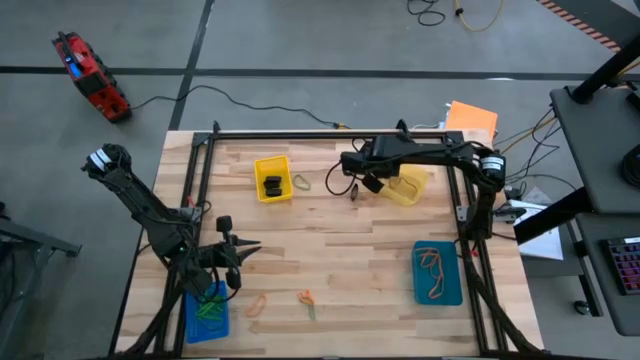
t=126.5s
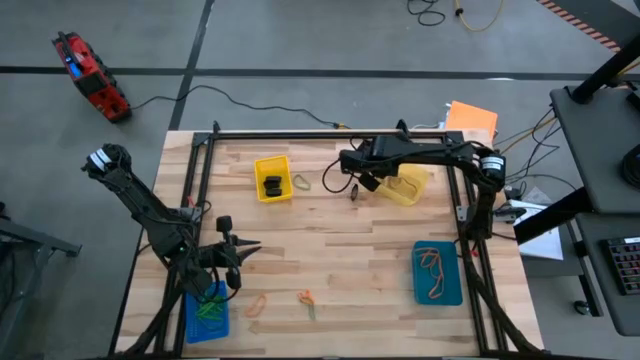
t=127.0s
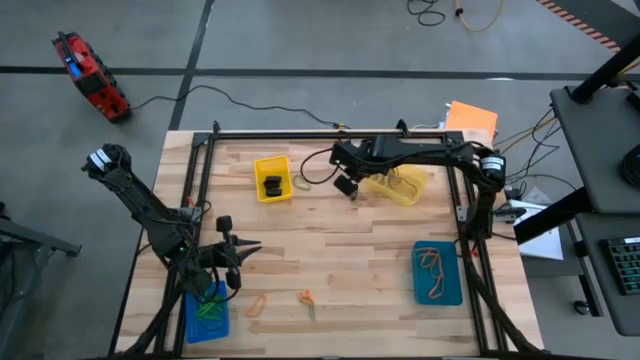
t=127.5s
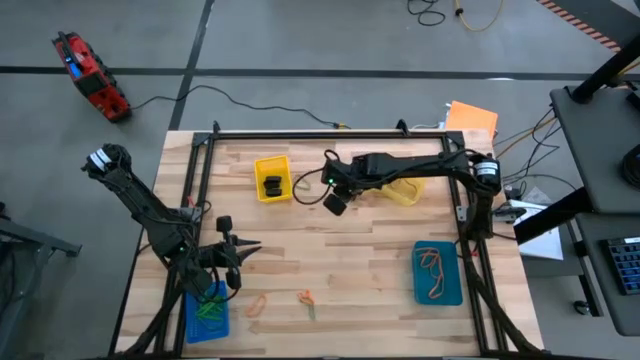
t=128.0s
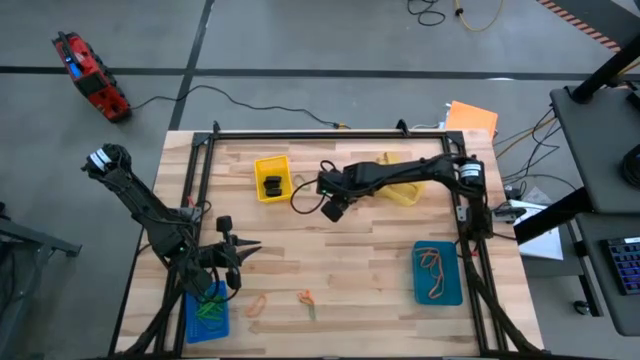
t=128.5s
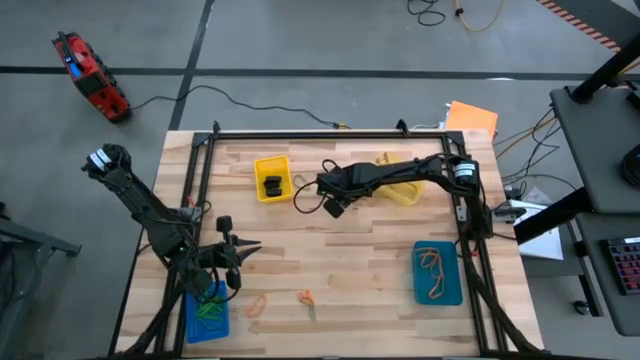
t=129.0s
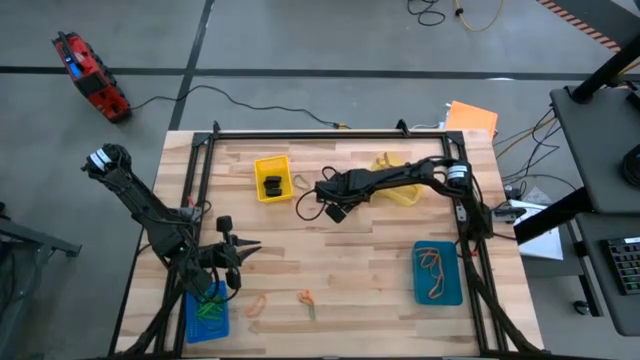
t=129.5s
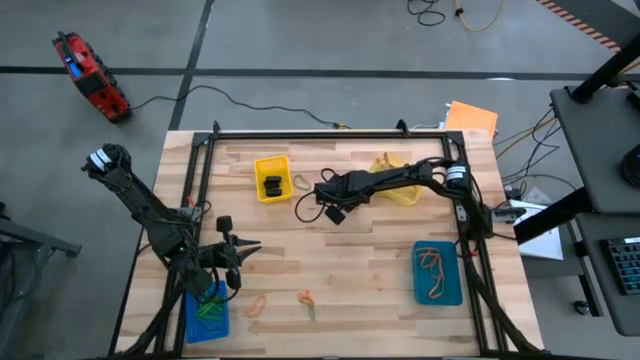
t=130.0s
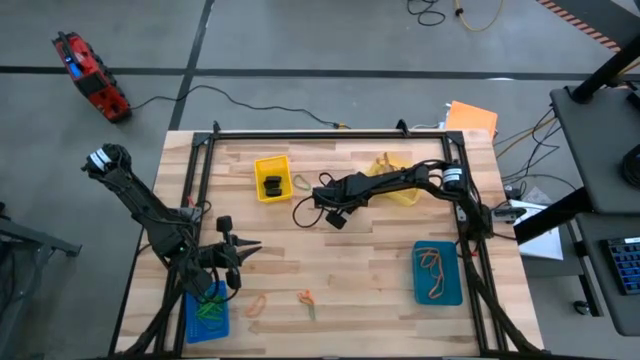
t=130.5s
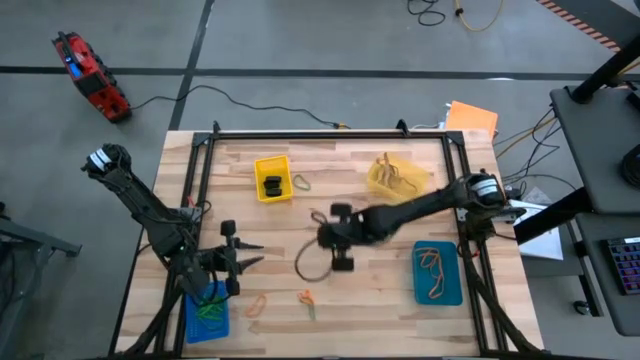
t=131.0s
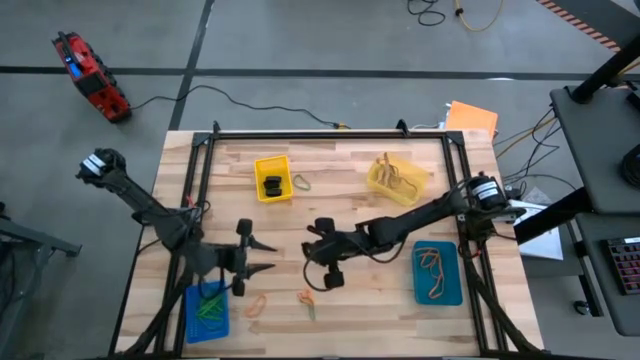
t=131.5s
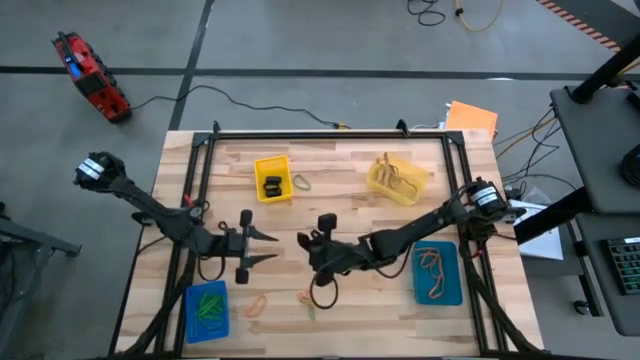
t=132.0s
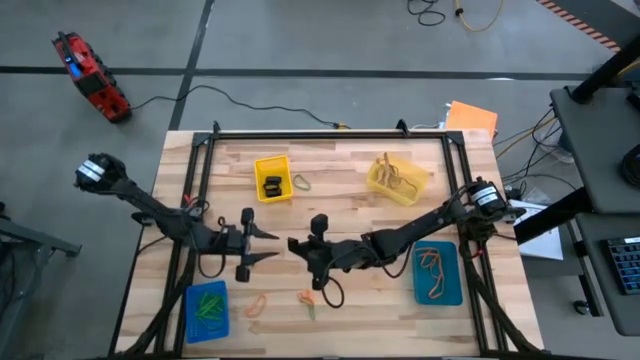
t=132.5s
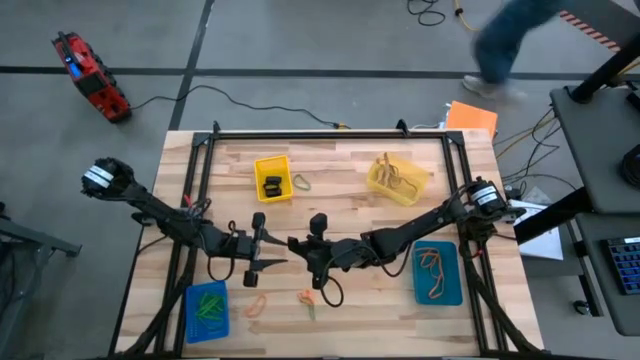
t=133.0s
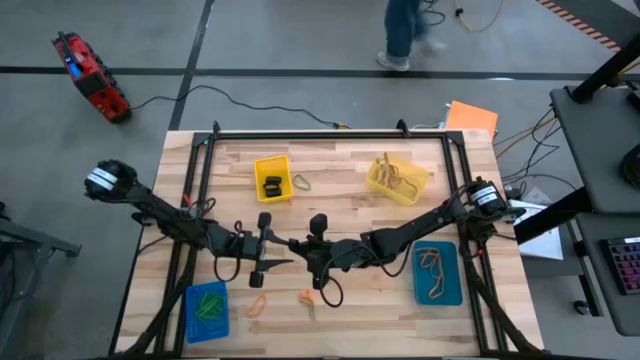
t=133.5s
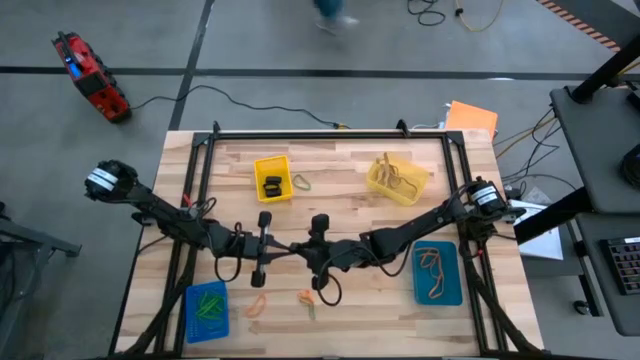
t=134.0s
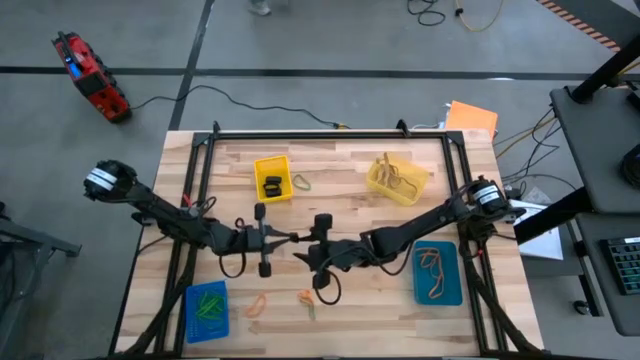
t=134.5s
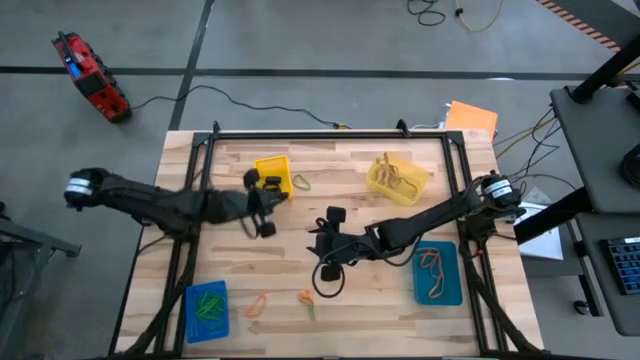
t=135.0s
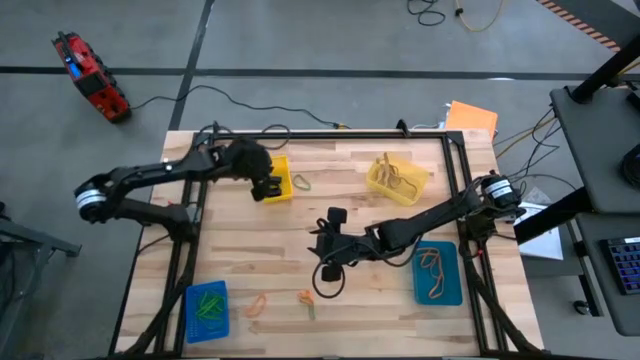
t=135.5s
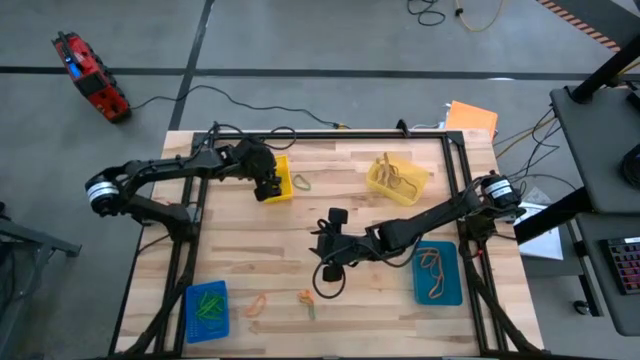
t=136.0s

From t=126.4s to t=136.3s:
Task: Sort rubber bands into baskets
Put the black rubber band into the left yellow bin

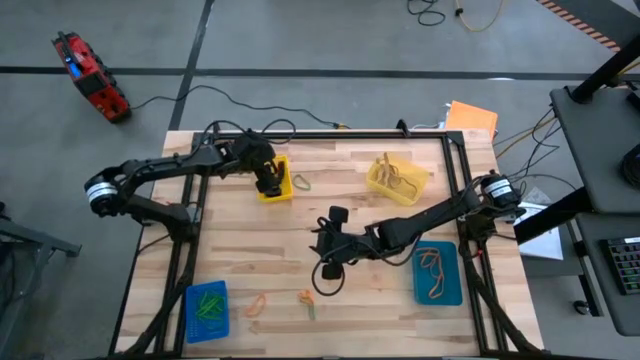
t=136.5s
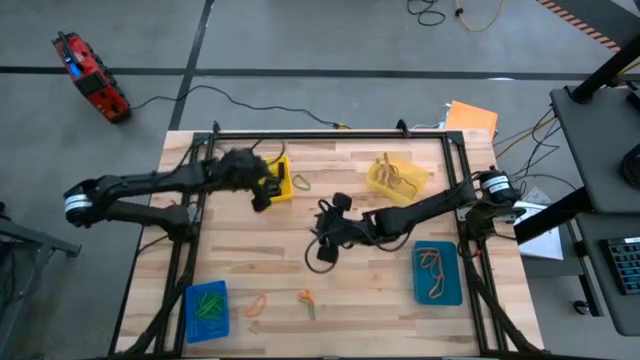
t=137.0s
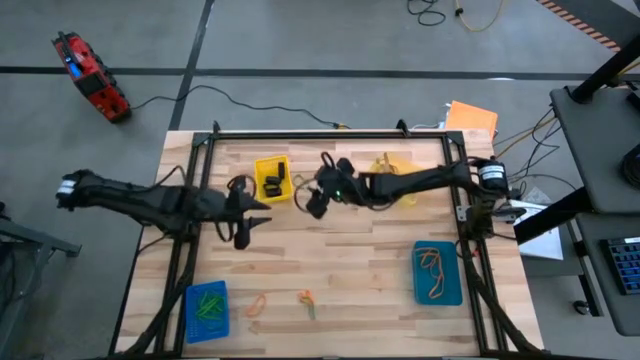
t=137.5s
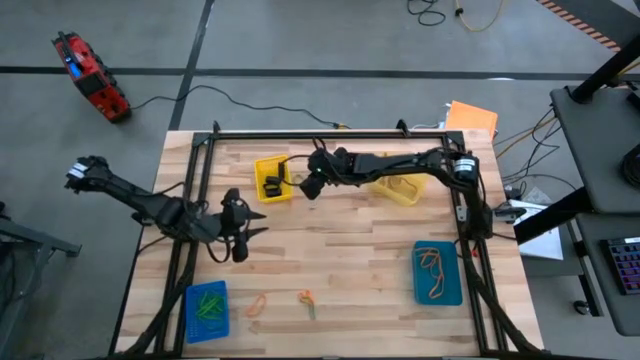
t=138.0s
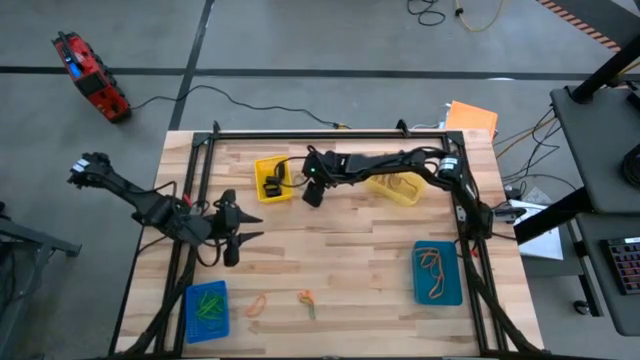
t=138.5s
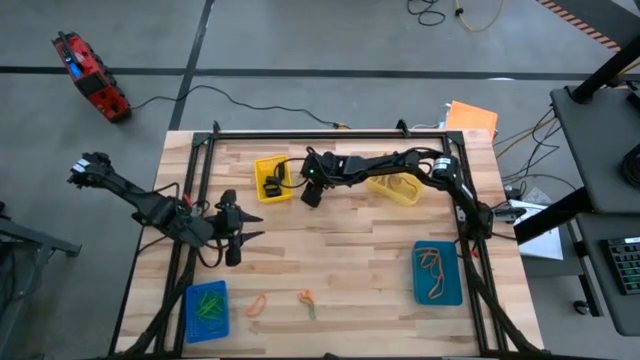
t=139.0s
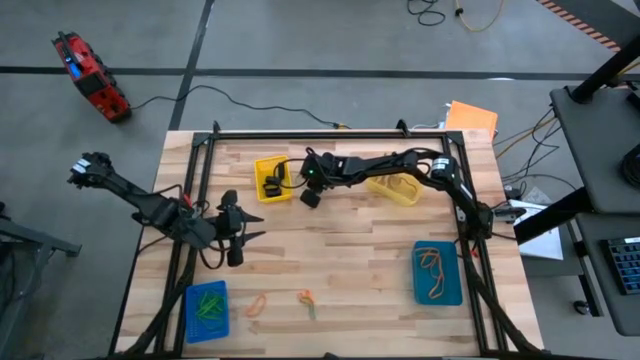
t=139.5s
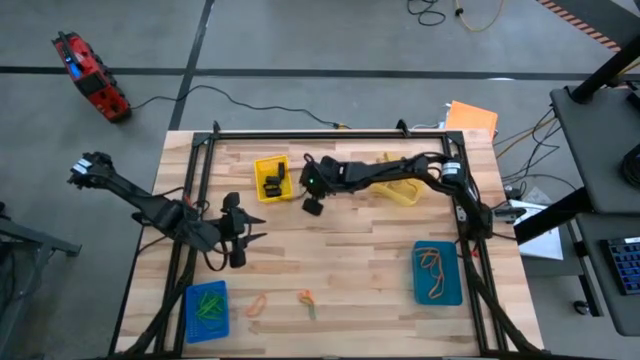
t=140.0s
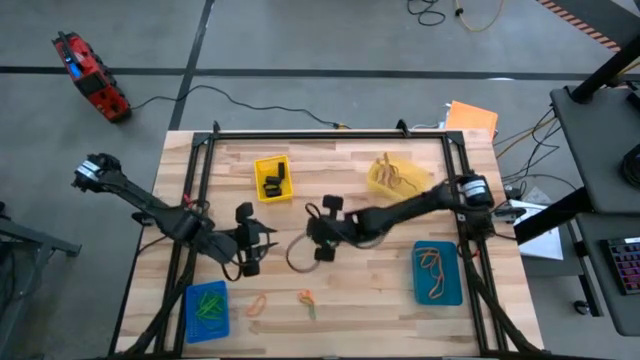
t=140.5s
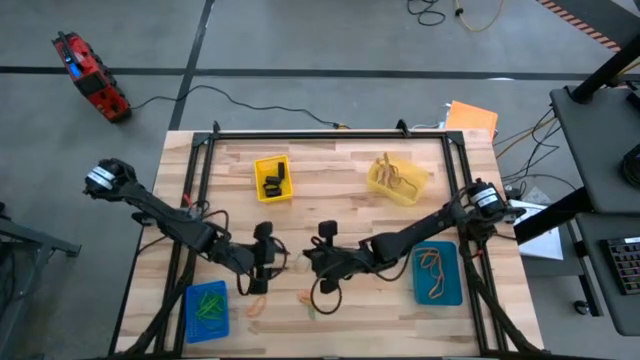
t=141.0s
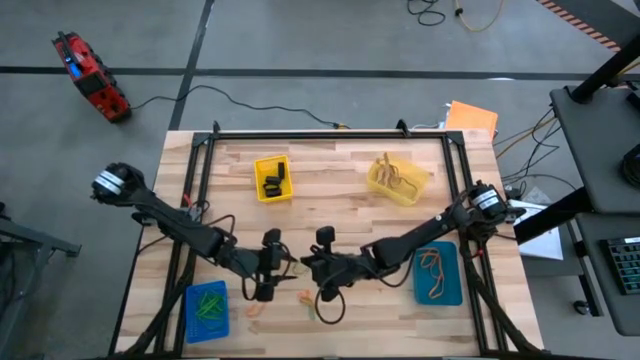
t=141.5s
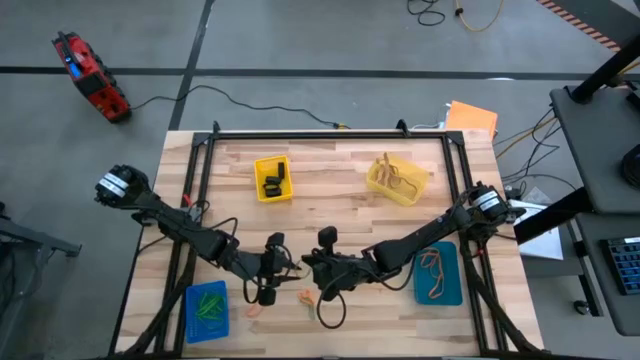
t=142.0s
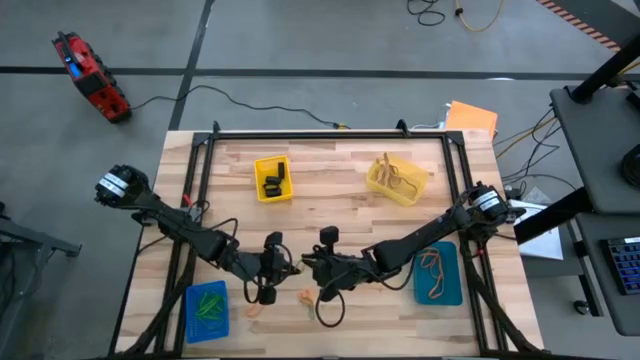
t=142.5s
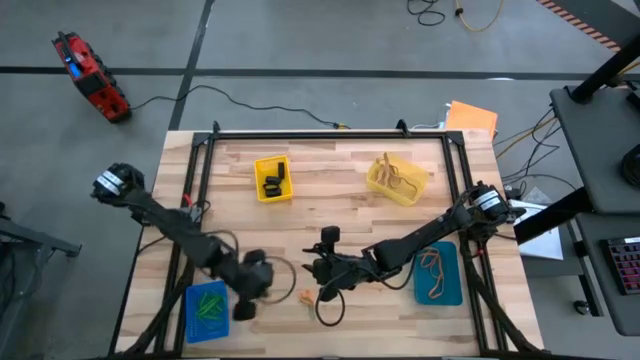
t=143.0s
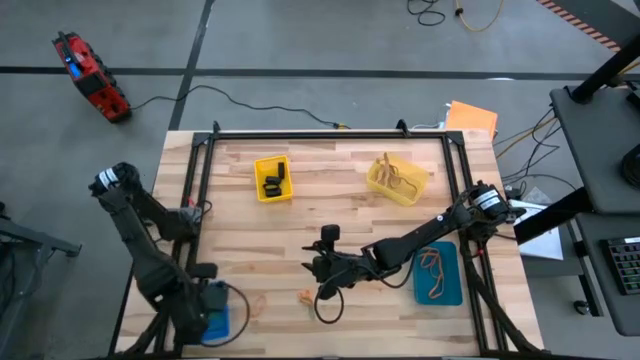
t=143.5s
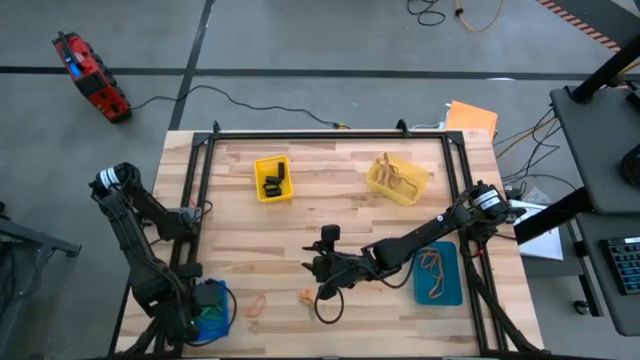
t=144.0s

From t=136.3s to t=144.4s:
Put the green rubber band into the left blue bin

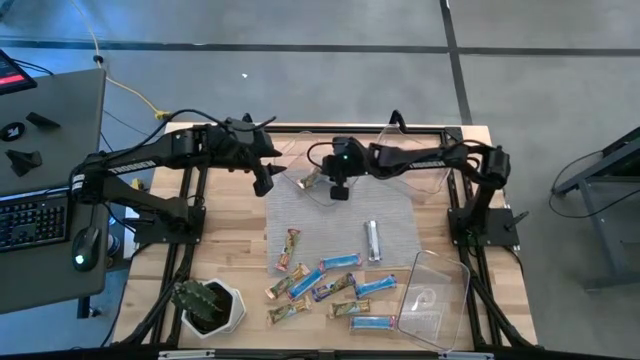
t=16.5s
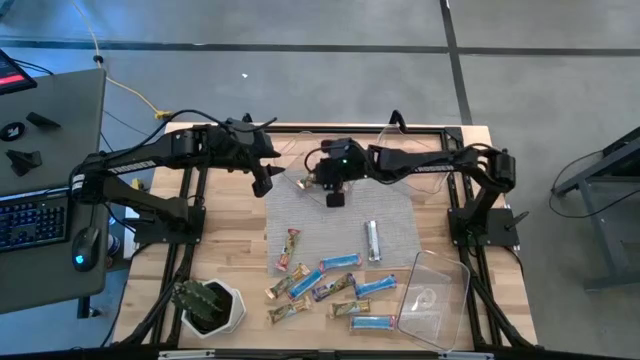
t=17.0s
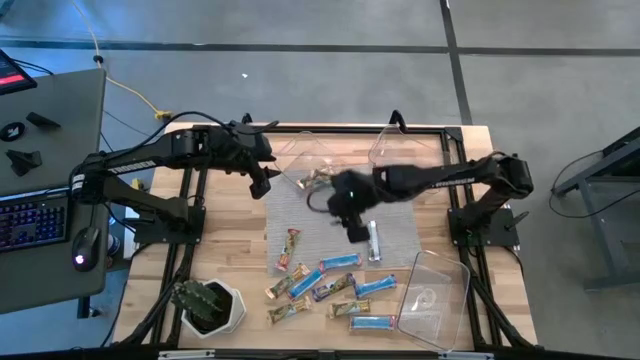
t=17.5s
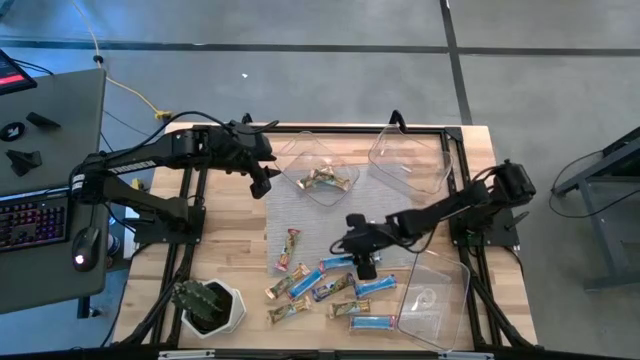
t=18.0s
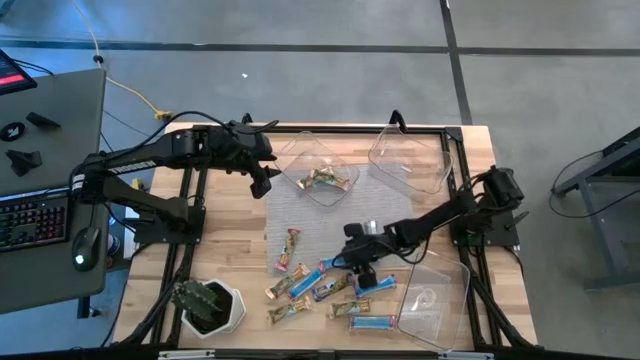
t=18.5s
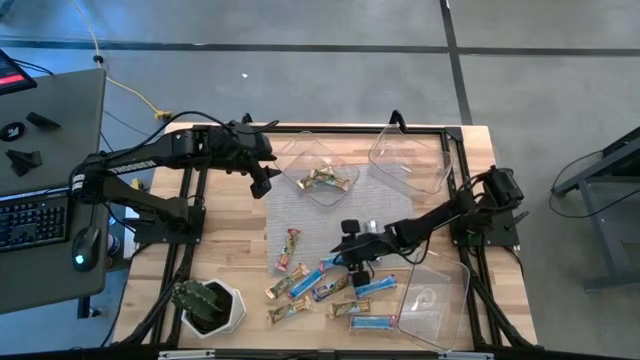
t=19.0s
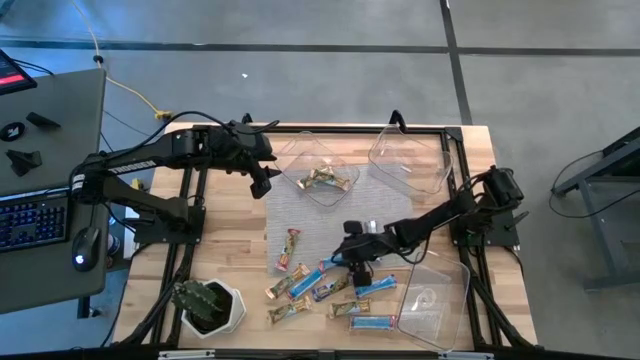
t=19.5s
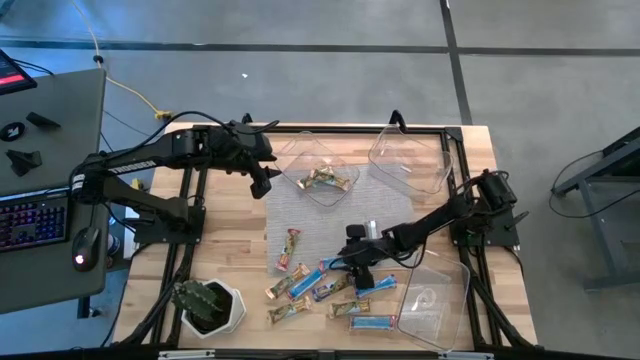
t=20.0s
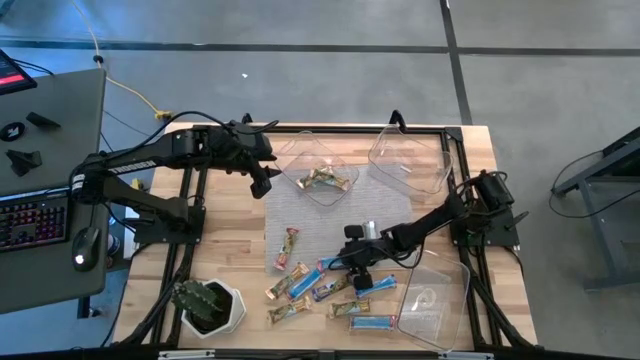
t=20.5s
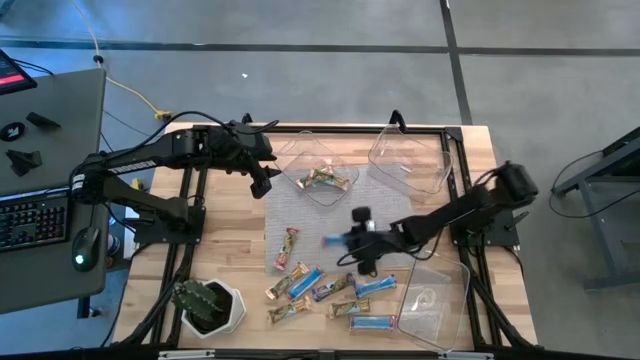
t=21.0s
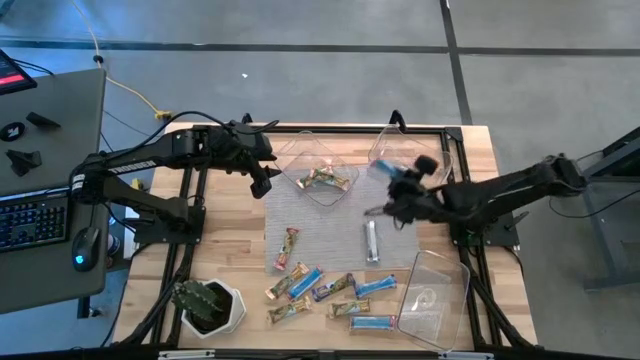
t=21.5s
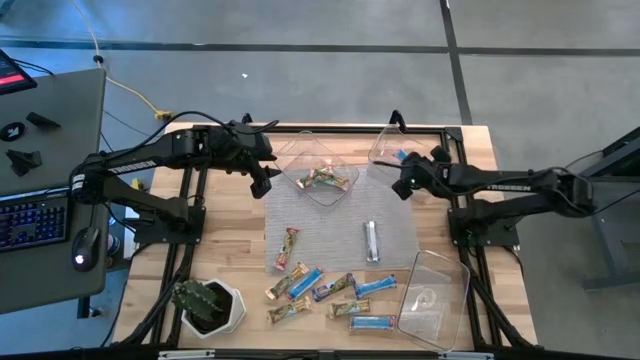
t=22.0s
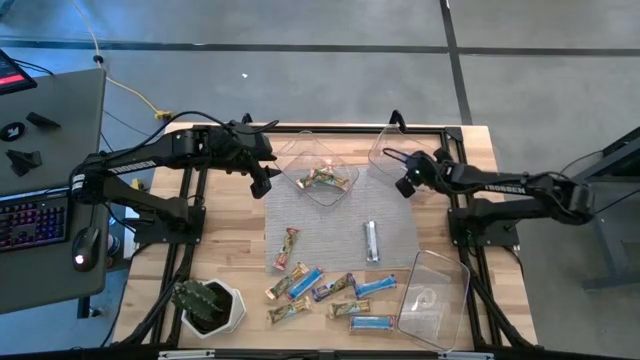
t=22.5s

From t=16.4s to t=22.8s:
Task: Pick and place Granola Bars by type
Put the red granola bar into the top right transparent bin
